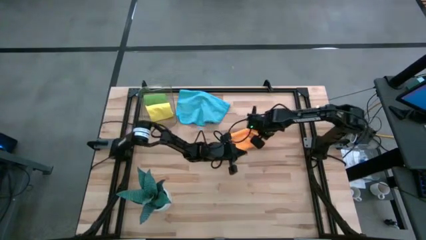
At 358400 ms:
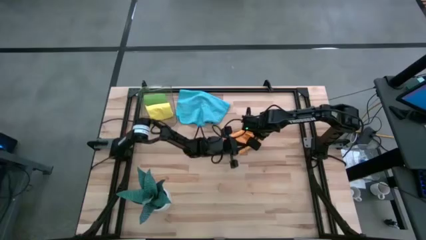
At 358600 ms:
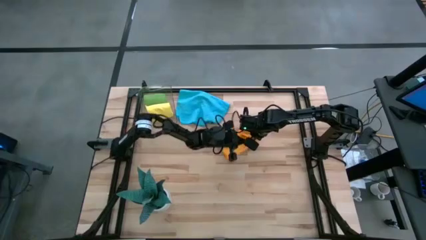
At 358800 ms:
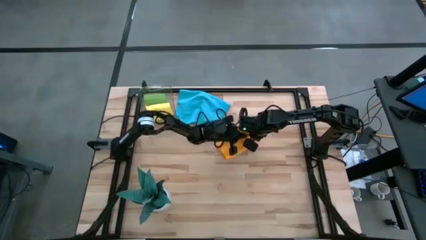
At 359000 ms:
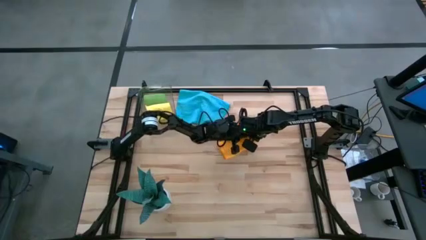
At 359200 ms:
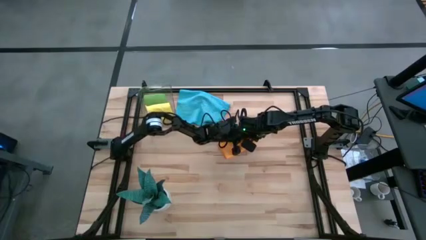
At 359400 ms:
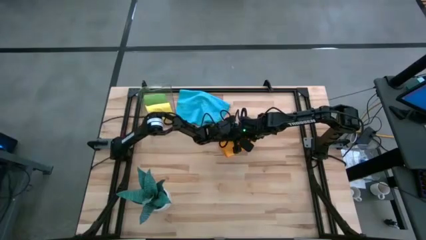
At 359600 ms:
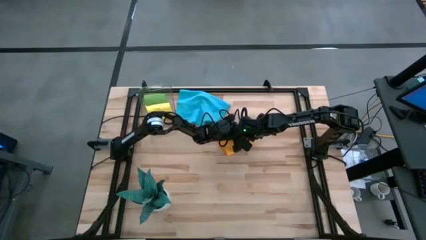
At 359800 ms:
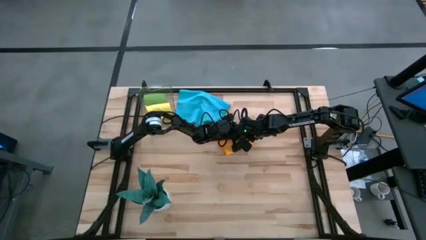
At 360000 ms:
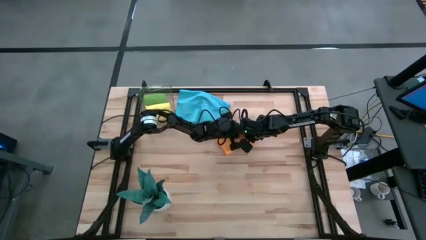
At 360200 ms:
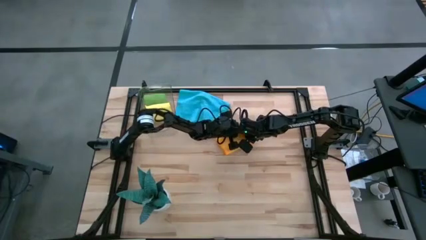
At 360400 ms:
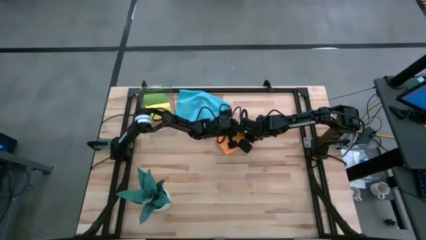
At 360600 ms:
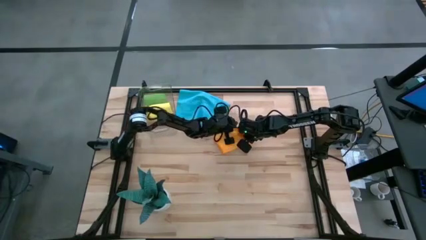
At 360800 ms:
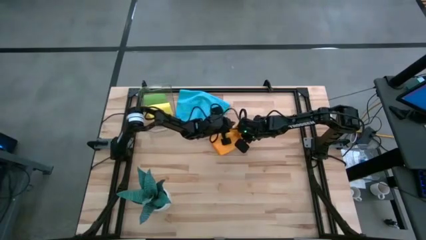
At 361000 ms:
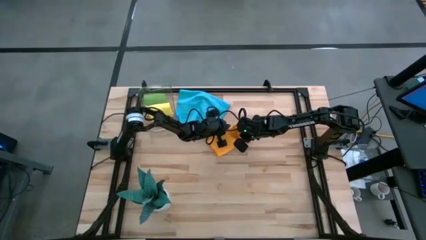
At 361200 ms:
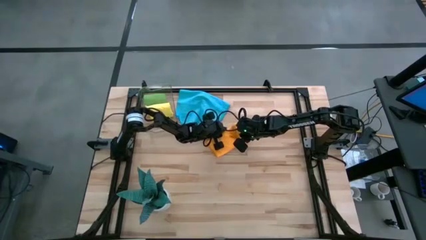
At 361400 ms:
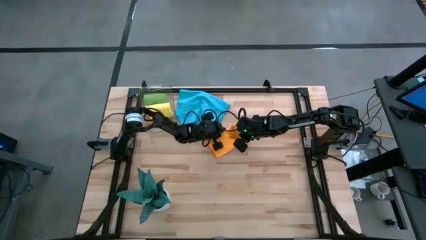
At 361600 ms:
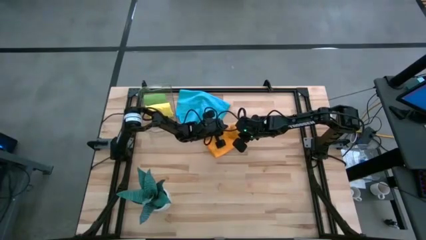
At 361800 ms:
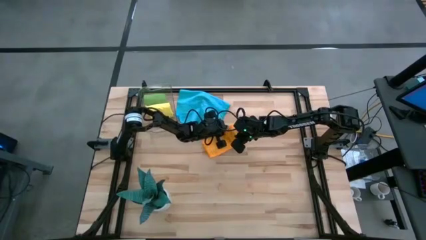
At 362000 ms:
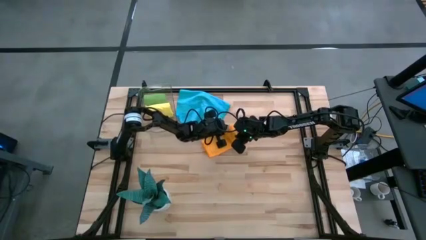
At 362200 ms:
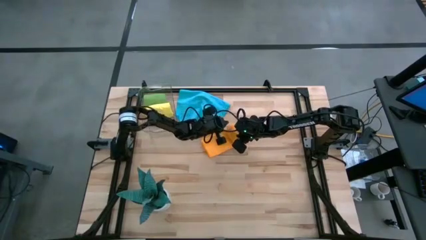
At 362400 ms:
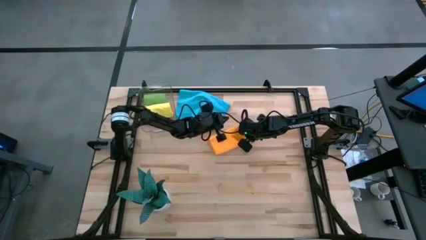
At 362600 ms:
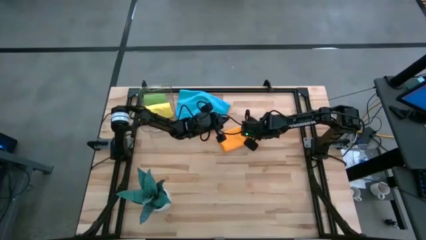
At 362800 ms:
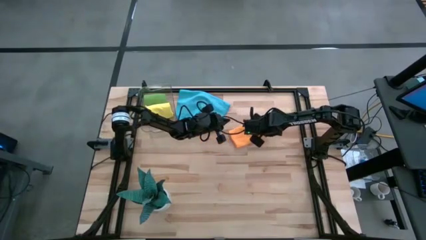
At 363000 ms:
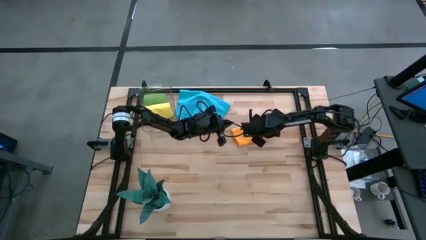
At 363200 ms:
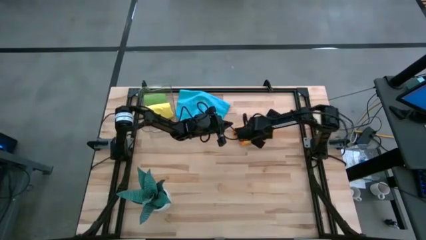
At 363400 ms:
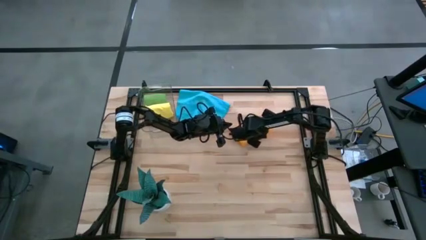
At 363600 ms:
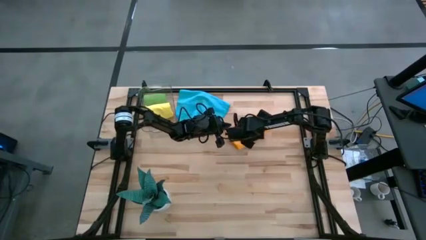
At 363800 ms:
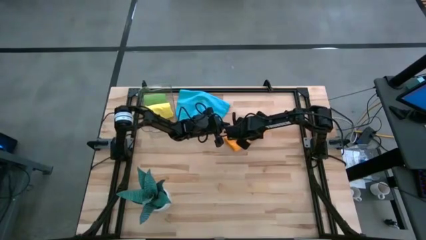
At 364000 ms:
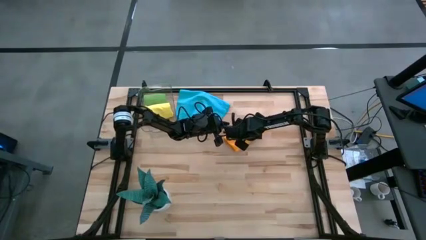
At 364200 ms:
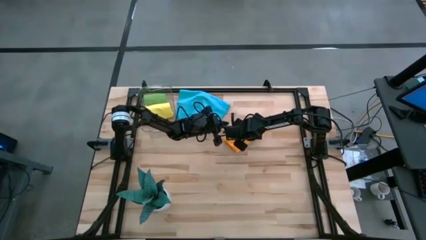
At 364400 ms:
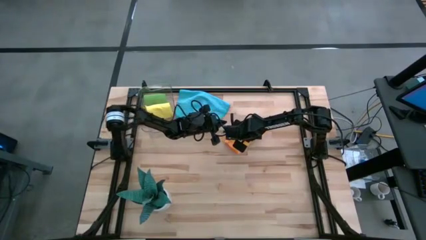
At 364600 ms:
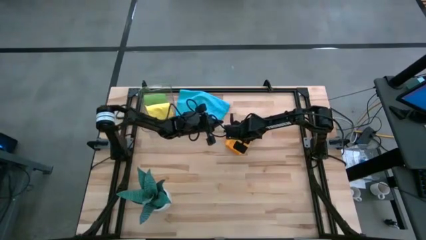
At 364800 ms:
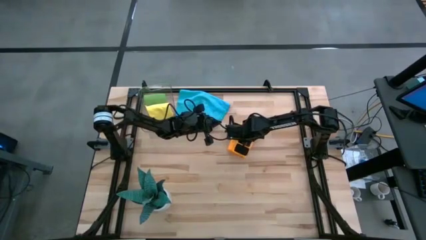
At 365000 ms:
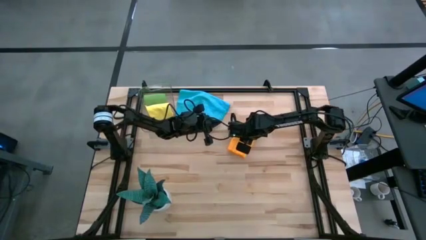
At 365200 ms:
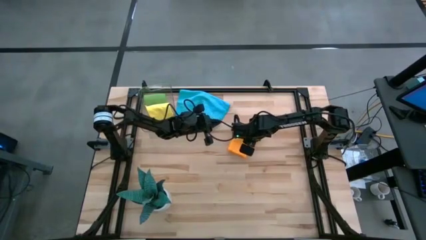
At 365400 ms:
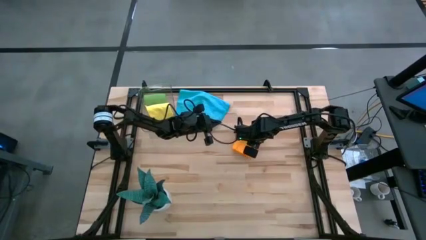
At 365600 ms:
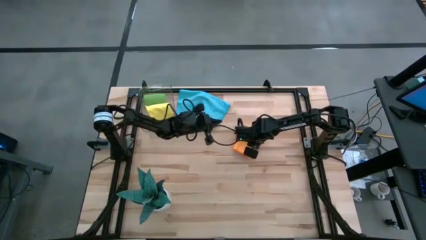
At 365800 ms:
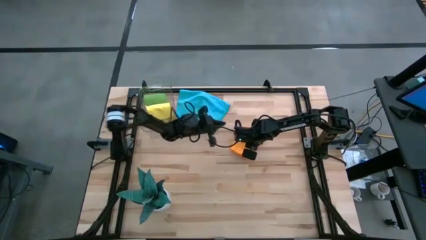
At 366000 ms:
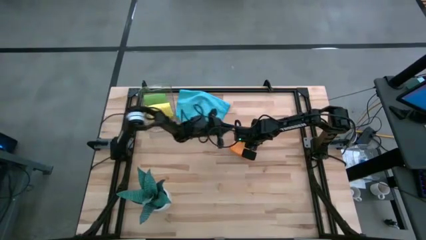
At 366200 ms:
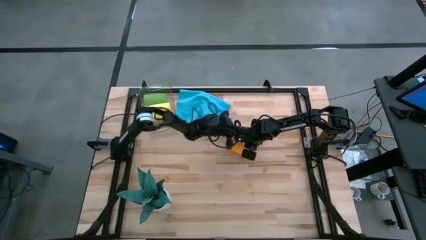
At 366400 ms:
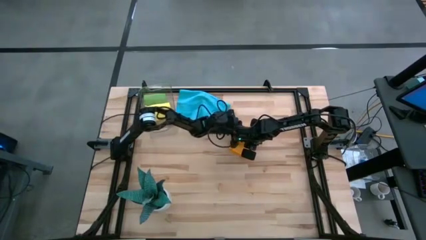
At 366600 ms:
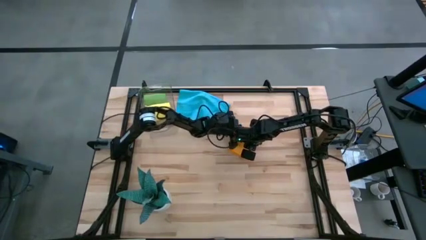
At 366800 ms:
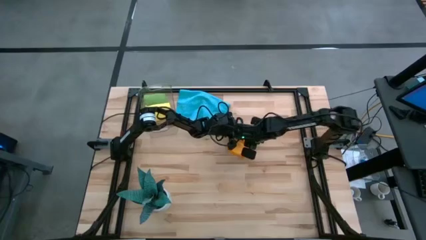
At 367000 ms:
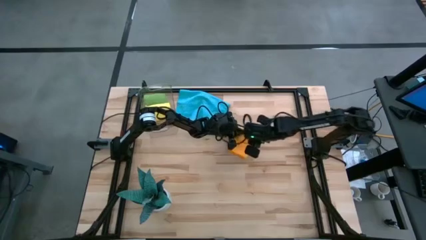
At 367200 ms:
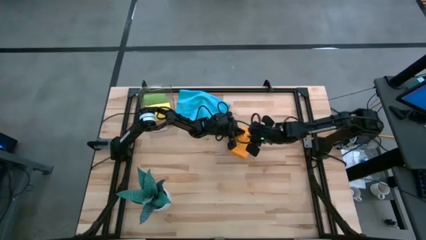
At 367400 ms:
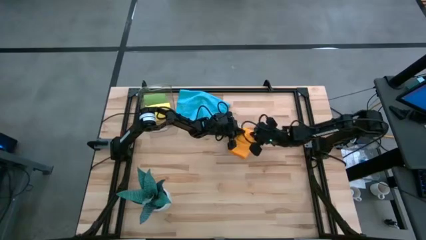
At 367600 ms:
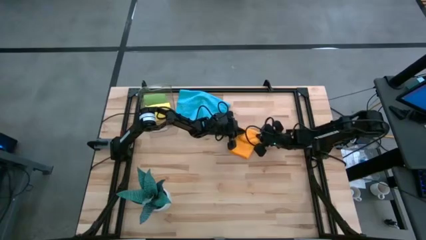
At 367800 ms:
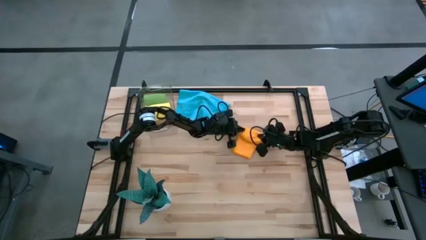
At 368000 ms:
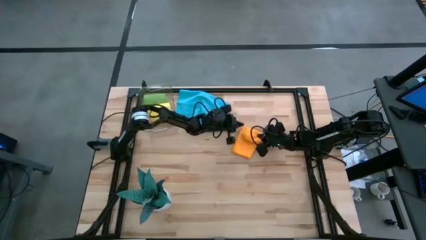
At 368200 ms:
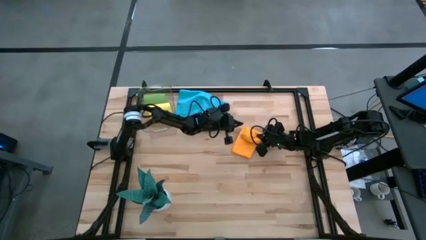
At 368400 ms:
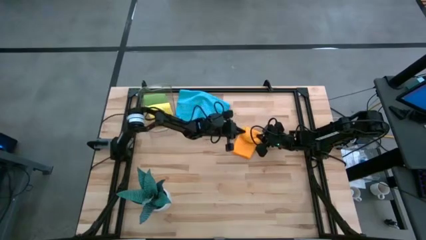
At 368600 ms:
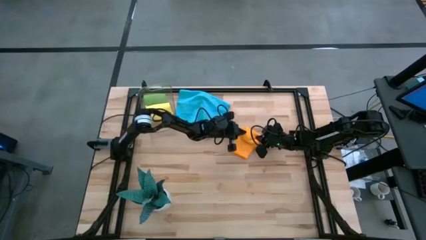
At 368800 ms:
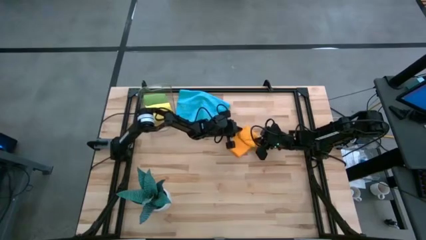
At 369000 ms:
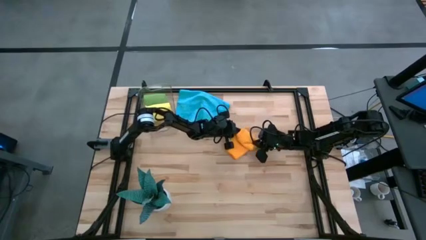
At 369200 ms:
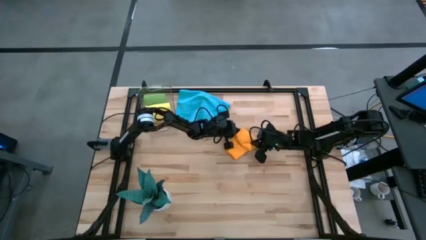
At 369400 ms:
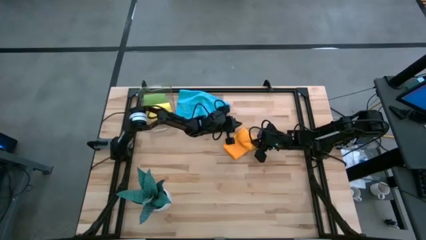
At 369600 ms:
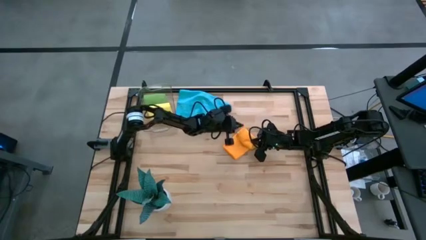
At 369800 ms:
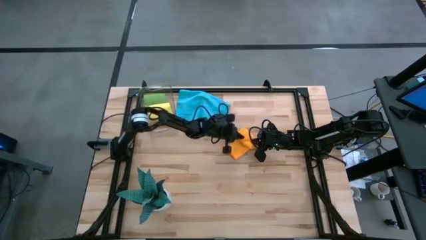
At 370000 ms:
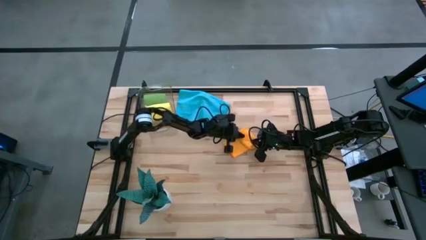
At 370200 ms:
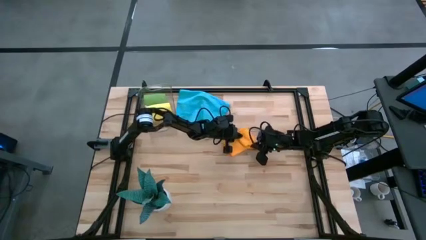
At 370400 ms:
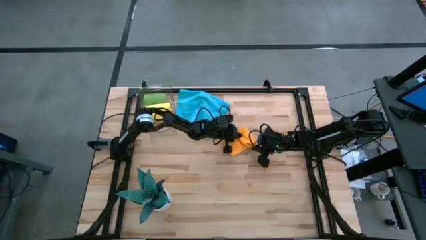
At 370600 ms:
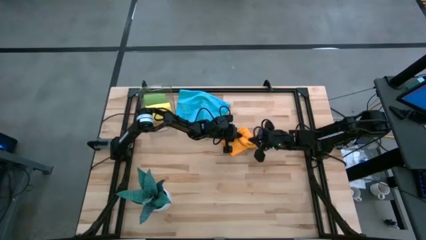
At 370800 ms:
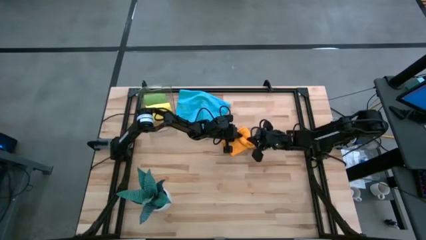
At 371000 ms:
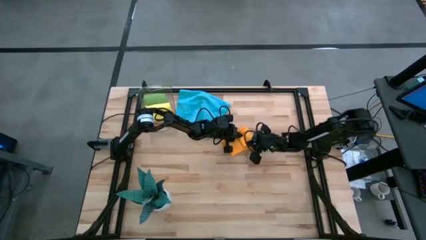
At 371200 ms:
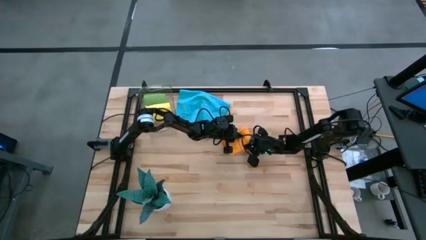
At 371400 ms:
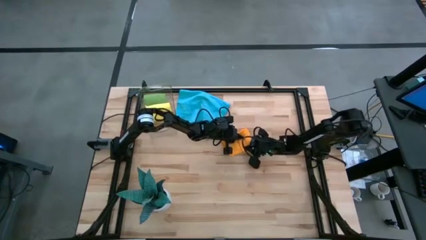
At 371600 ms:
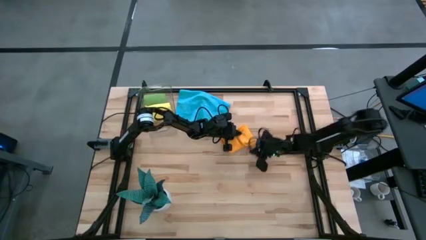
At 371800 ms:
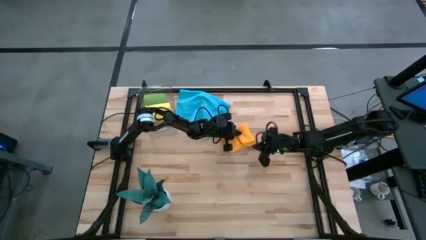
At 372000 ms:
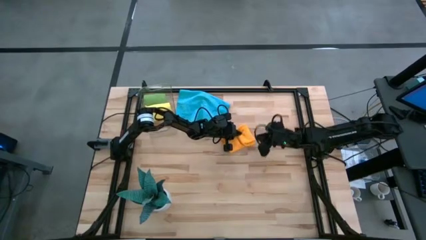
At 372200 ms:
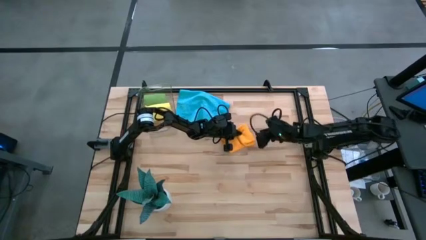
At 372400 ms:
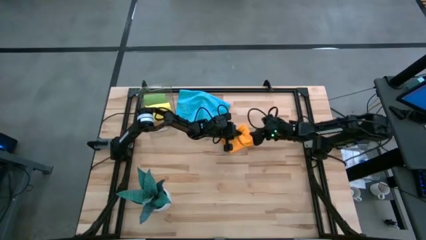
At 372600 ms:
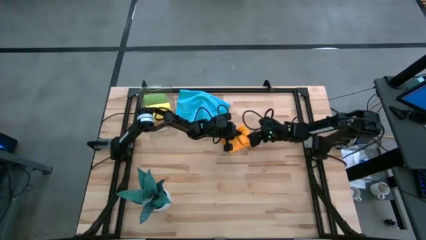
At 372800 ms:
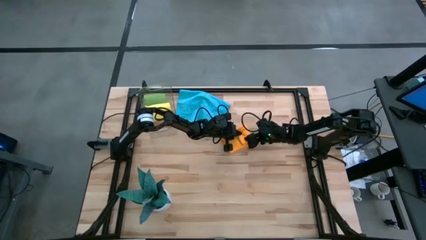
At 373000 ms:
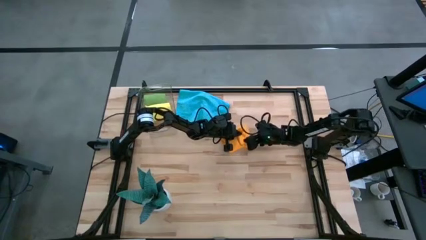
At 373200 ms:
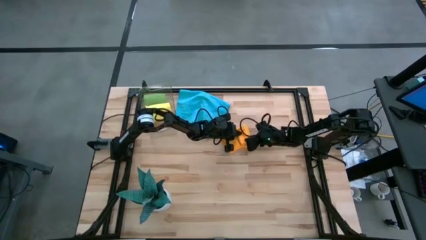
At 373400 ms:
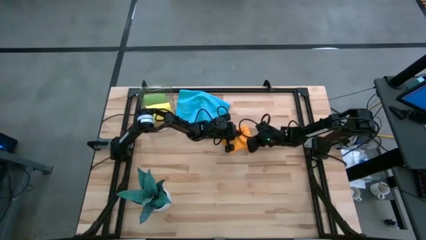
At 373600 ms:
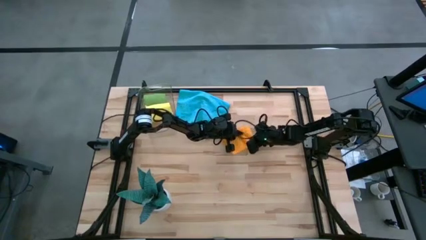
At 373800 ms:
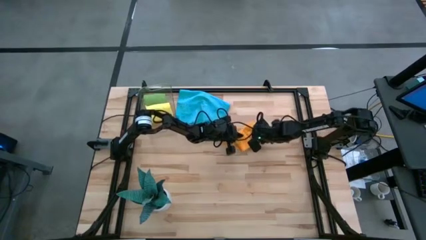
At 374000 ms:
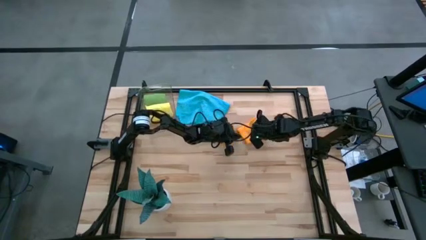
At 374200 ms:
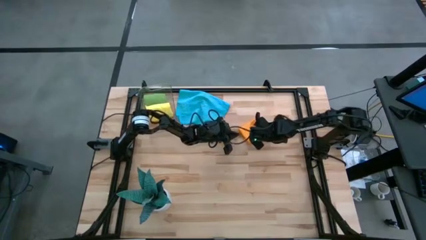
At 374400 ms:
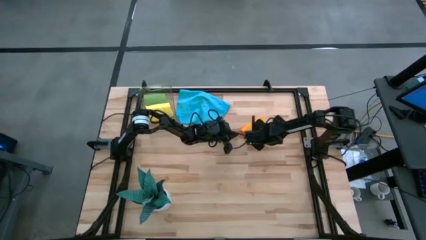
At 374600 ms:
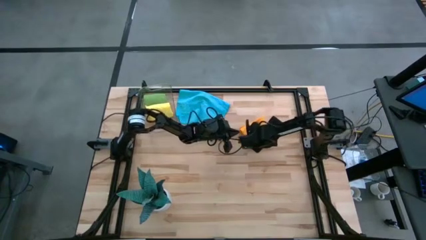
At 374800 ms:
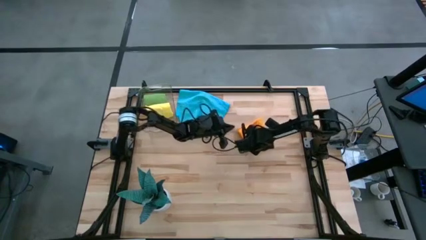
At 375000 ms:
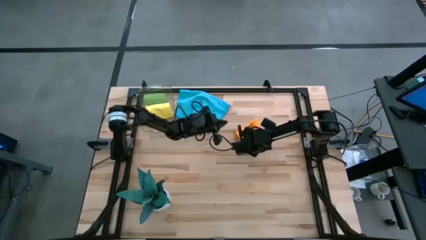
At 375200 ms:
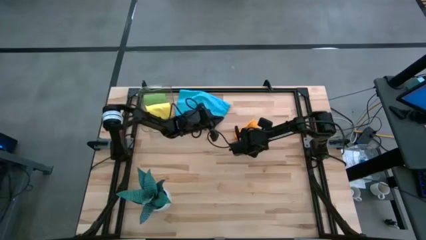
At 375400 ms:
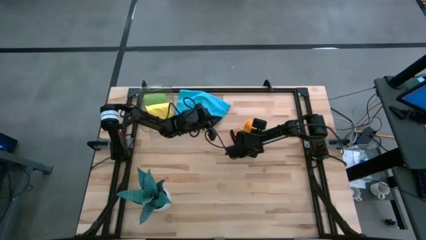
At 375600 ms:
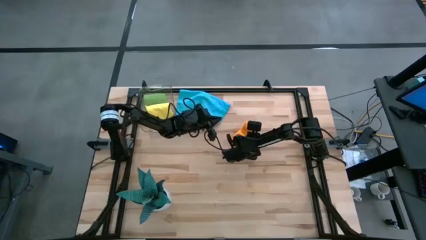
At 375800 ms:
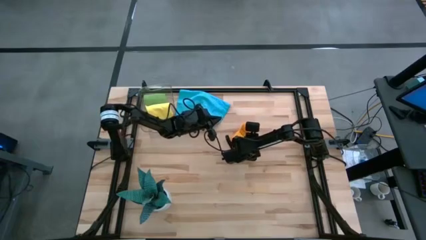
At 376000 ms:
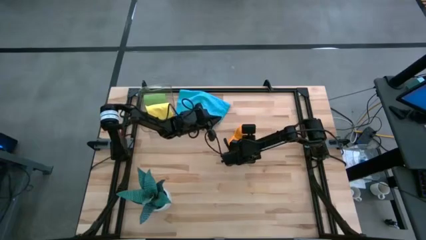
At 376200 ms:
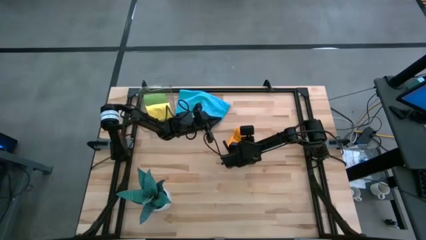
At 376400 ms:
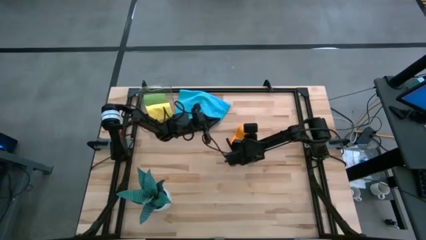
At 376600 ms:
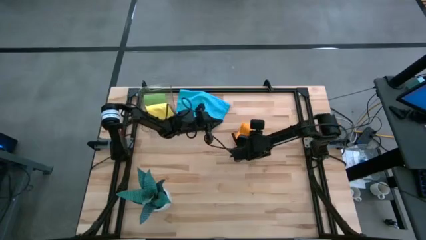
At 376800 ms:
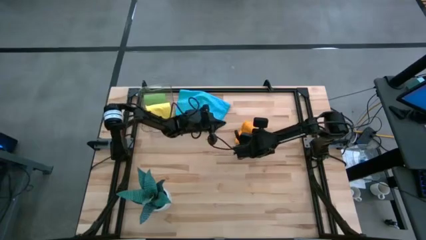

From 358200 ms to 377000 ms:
Task: Roll microfiber towels into tight, uniform cylinder then place into a basket
Roll the orange microfiber towel
